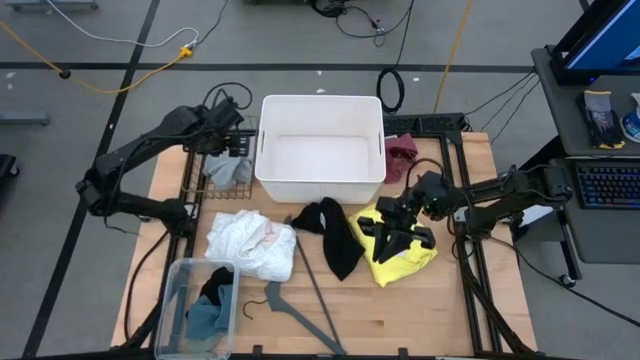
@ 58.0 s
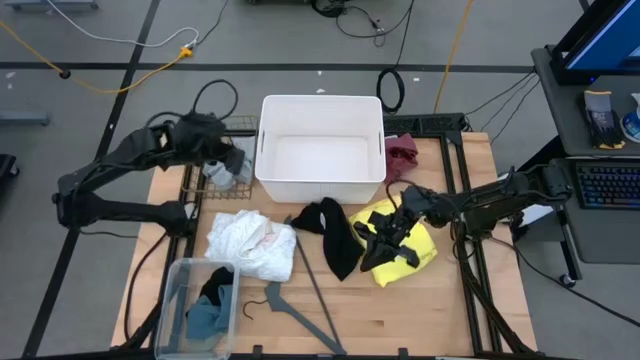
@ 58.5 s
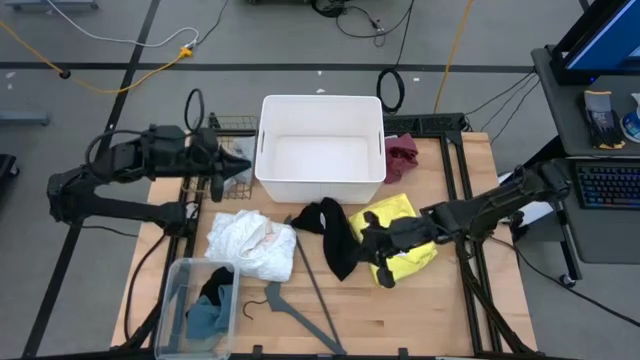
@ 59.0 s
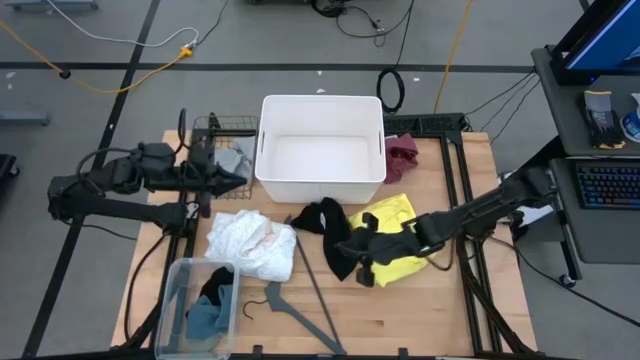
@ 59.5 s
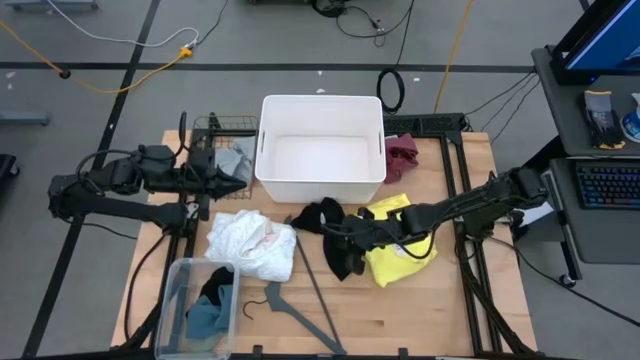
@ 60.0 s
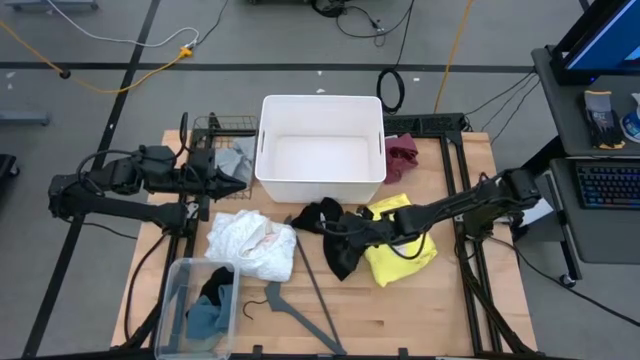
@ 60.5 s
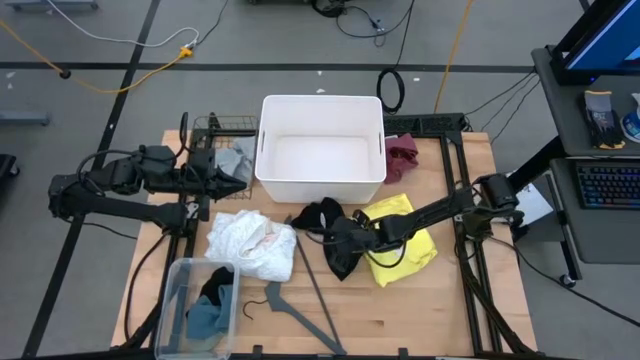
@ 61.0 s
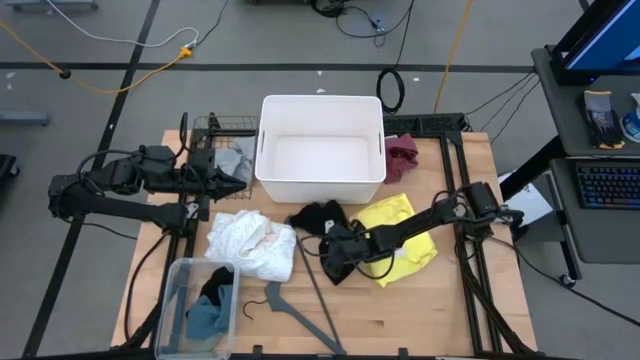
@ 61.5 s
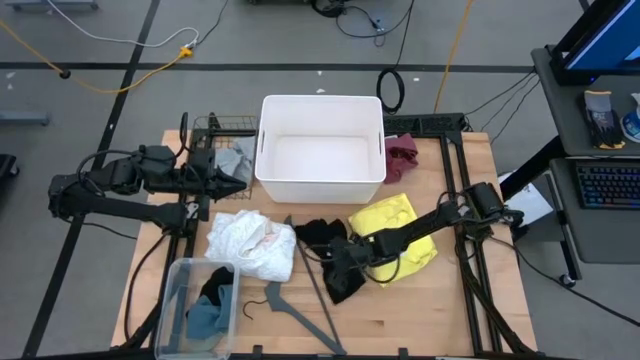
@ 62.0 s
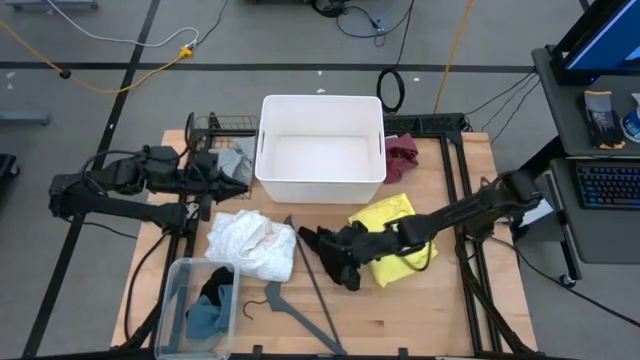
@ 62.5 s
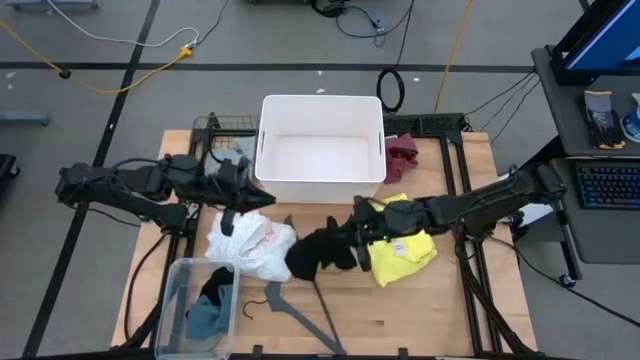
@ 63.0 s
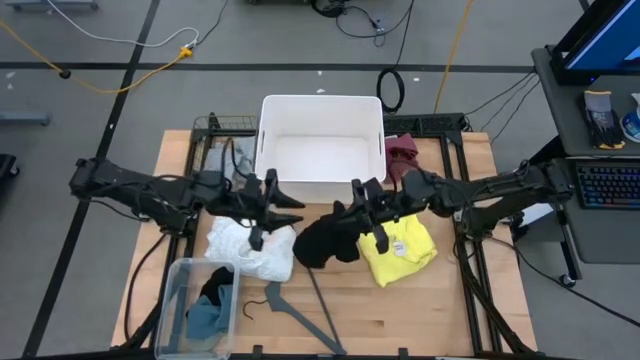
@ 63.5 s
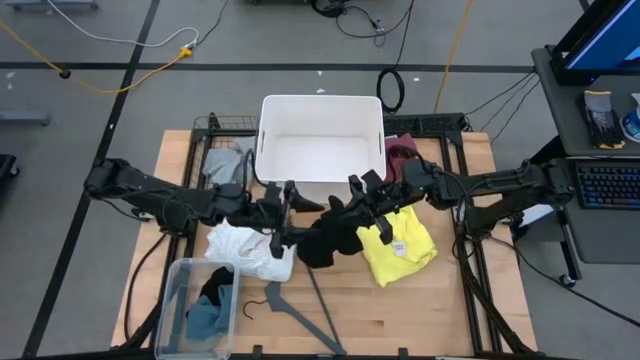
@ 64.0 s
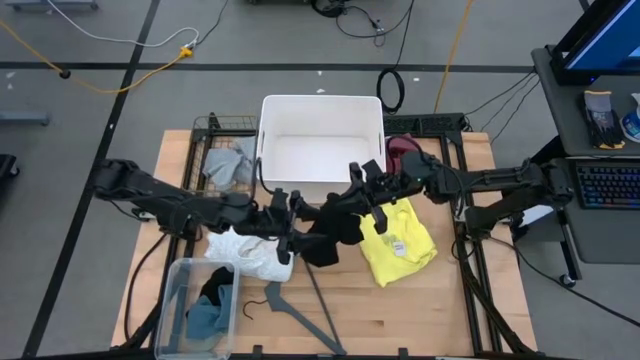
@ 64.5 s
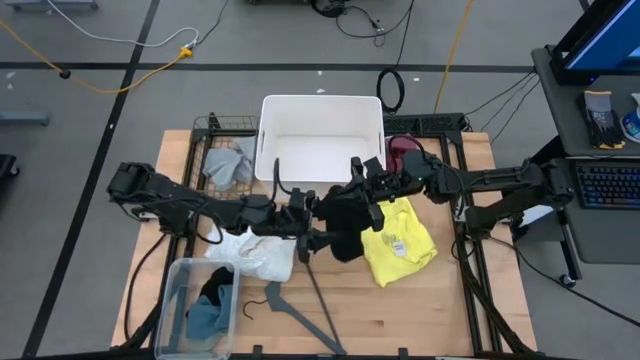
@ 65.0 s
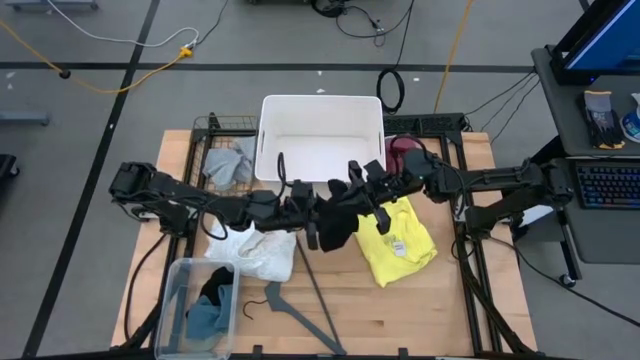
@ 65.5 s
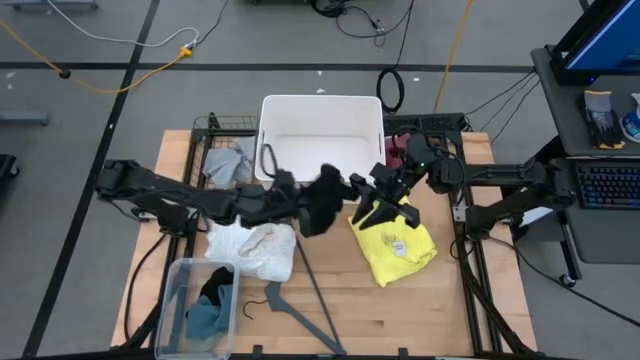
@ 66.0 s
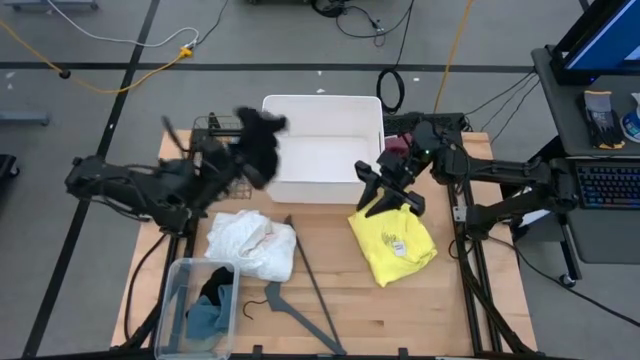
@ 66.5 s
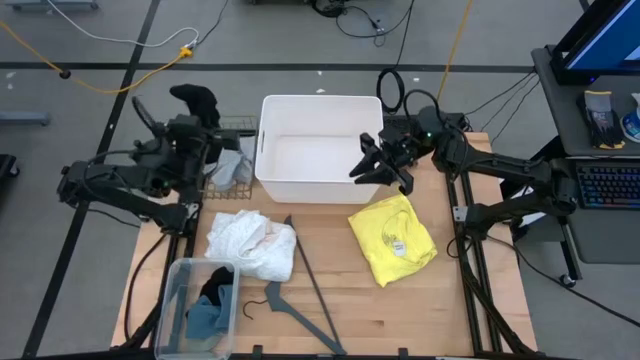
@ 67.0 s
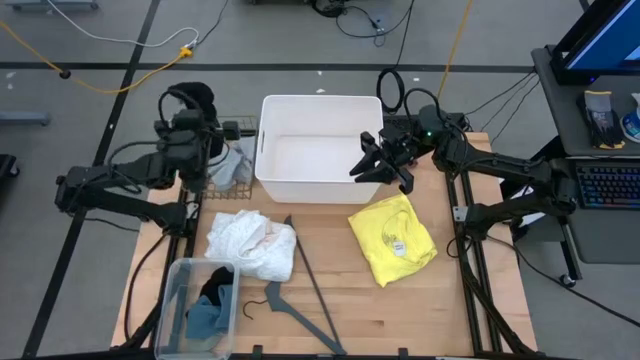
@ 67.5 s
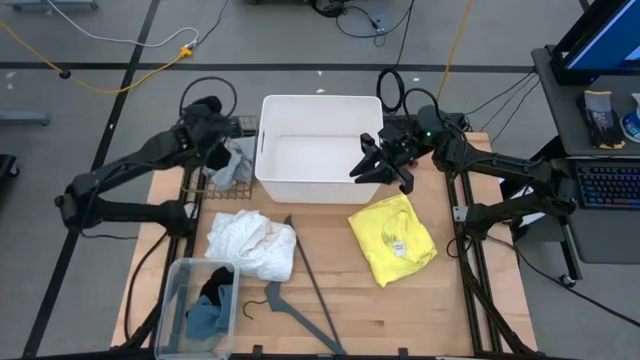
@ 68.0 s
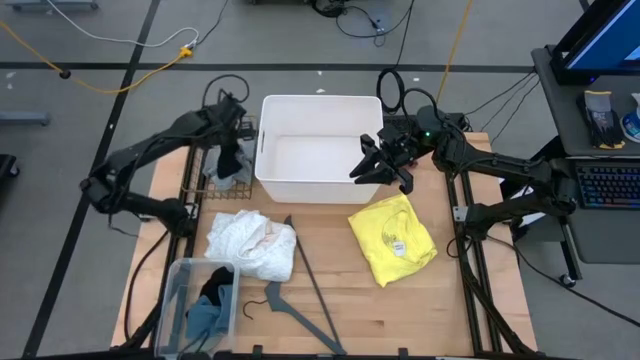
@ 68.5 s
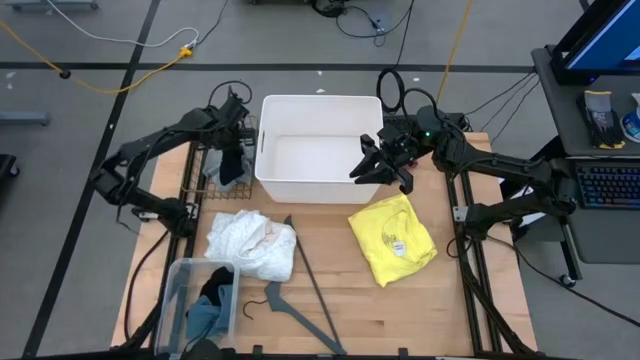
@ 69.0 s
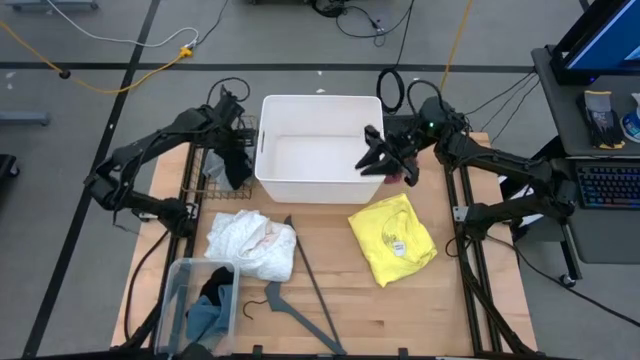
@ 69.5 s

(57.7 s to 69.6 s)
Task: Pick & Place Cloths
Put the black underwear into the black wire basket

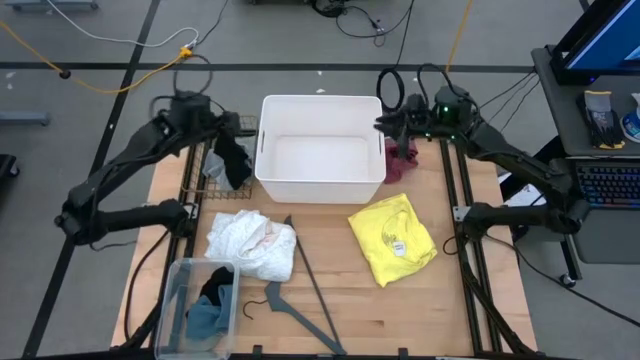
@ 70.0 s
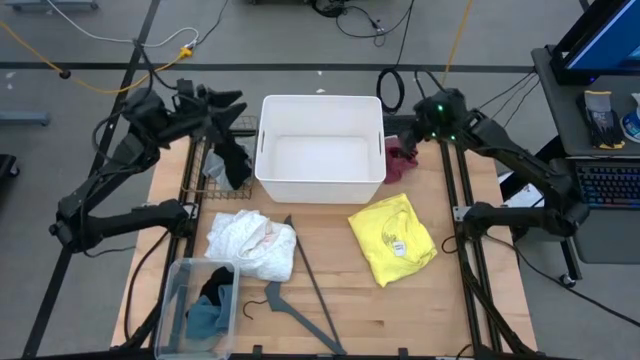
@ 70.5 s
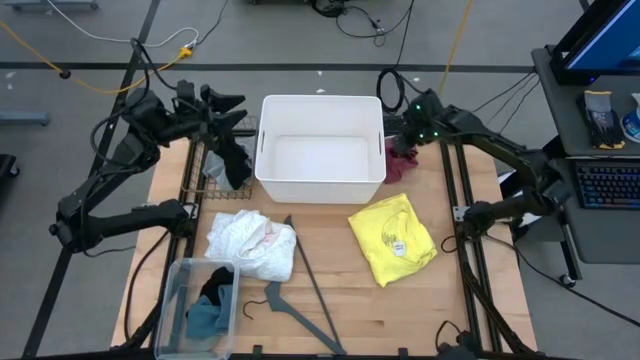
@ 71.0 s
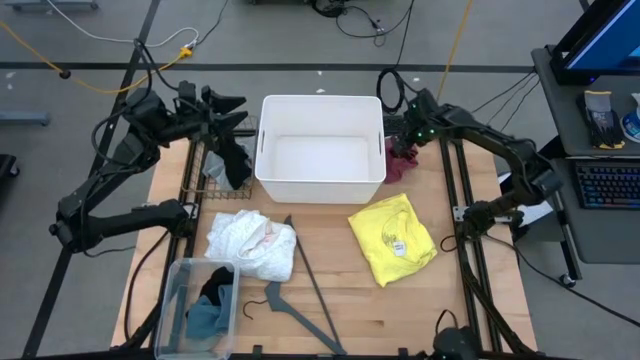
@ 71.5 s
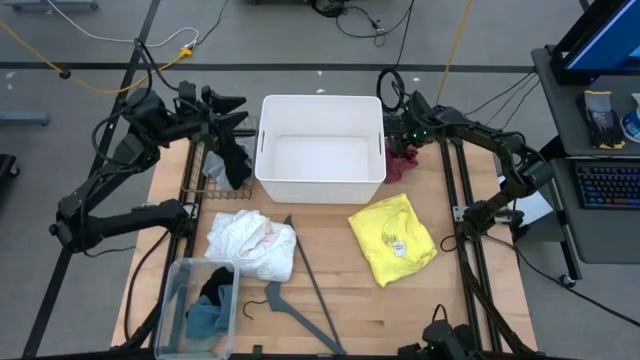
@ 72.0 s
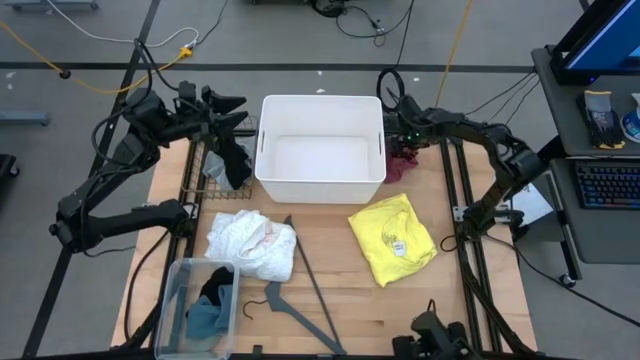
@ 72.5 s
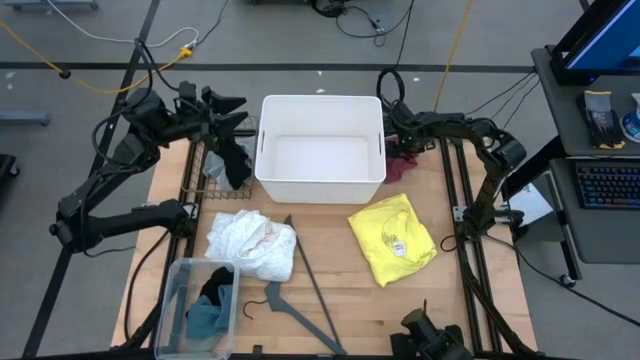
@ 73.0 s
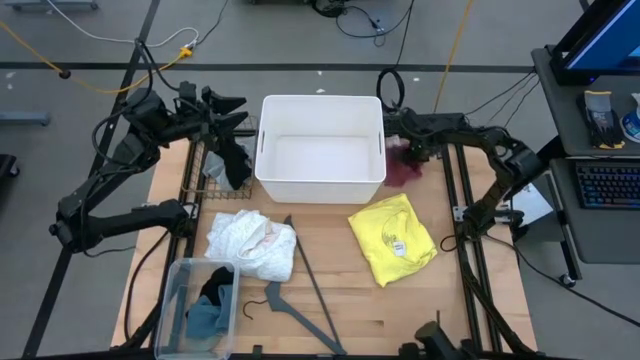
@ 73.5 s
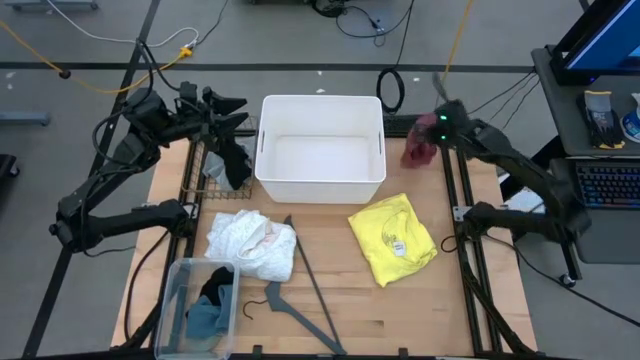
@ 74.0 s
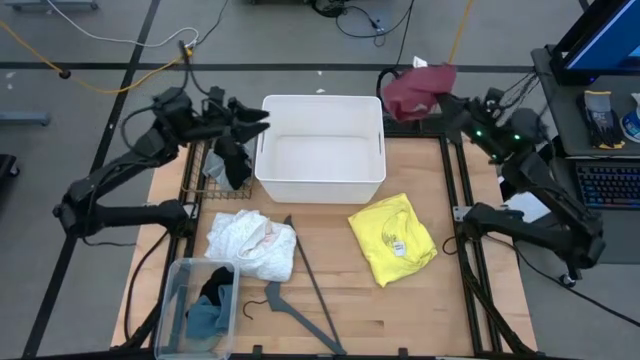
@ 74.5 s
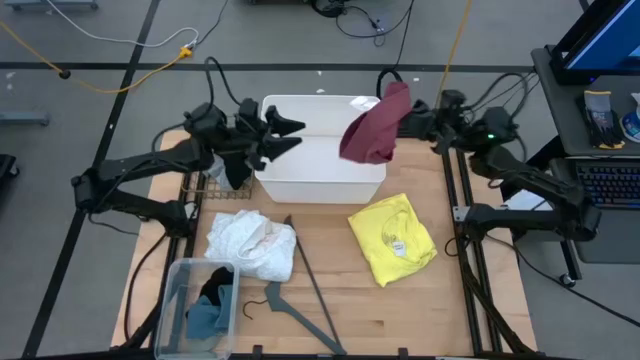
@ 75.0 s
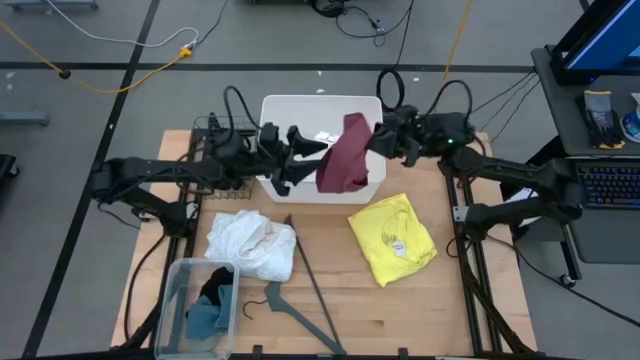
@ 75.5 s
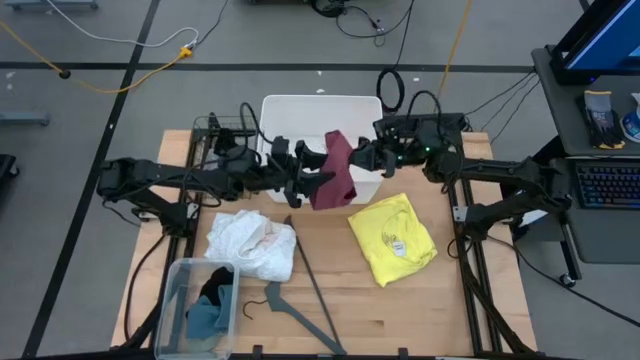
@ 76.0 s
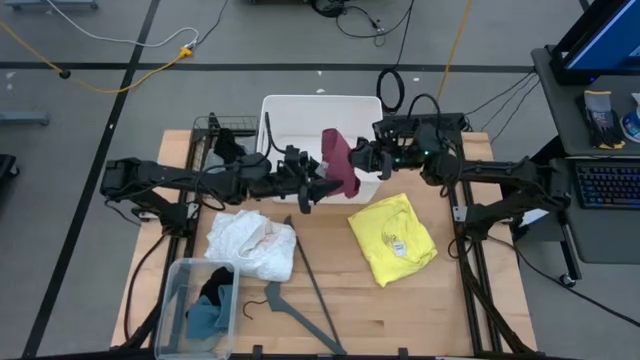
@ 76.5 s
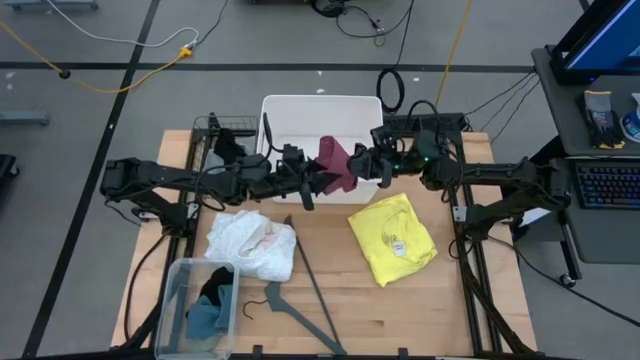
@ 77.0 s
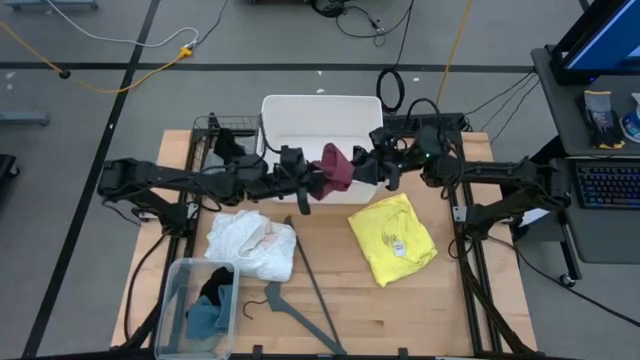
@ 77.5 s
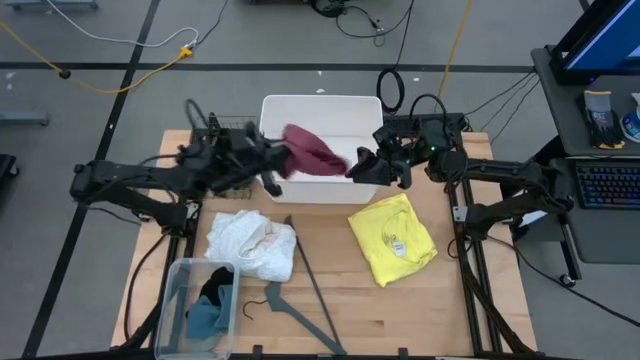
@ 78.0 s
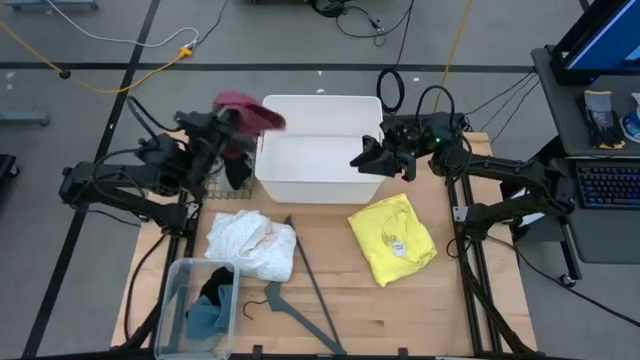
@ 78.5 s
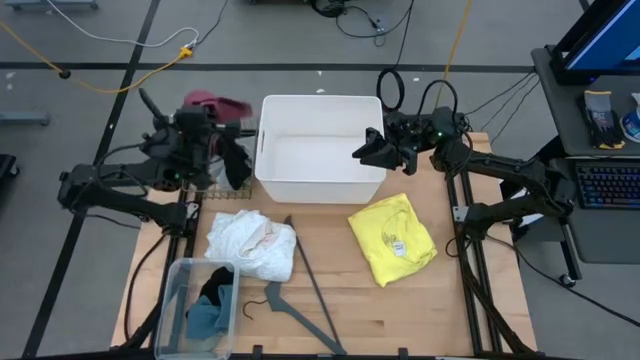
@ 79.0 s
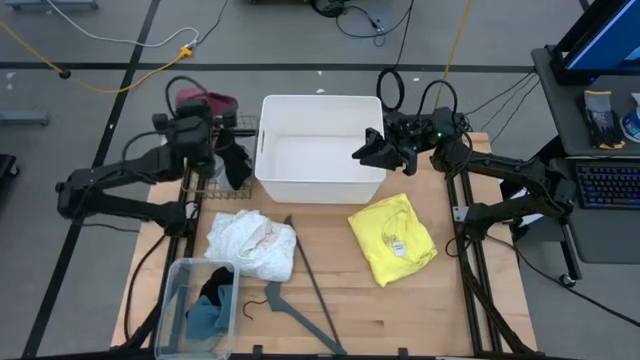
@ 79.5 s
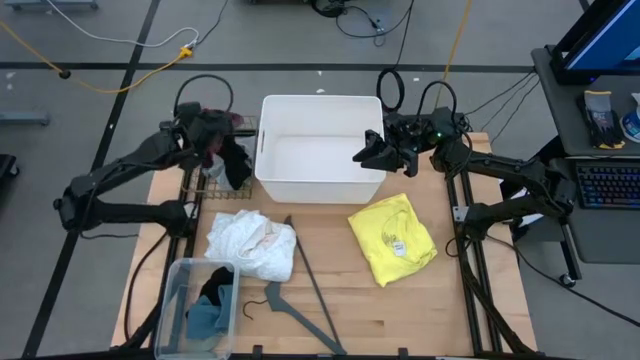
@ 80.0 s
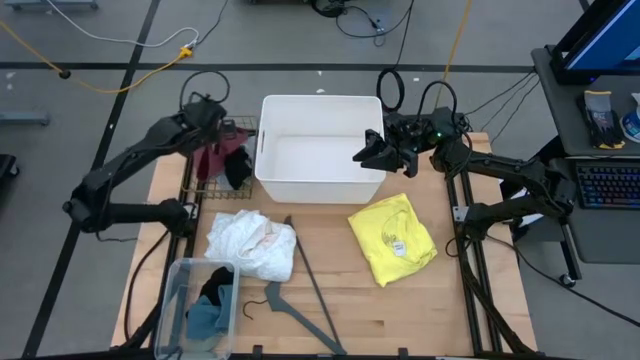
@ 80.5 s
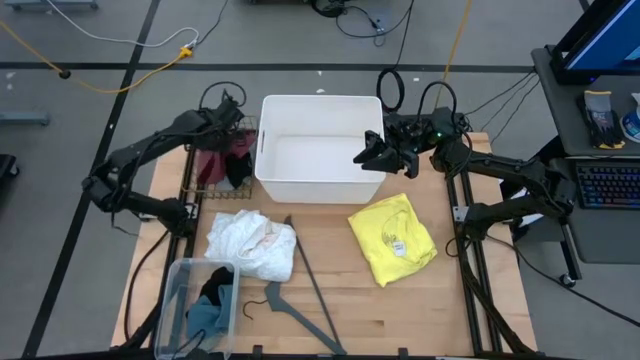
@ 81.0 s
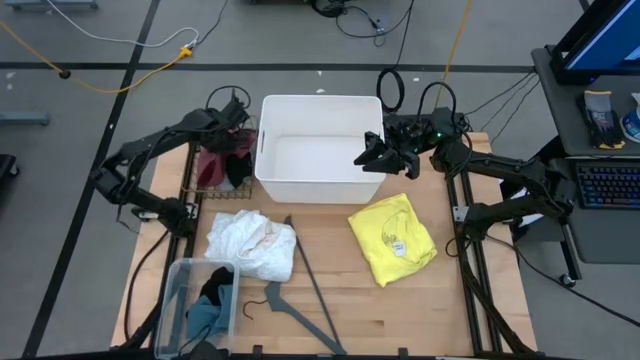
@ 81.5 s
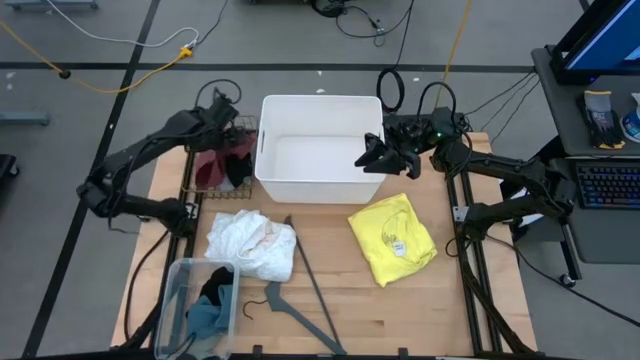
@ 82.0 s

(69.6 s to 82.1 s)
Put the red underwear into the black wire basket
